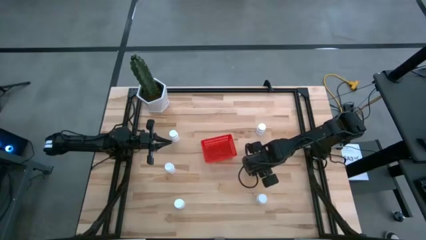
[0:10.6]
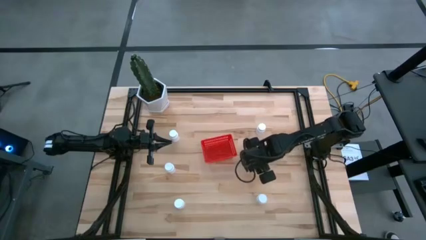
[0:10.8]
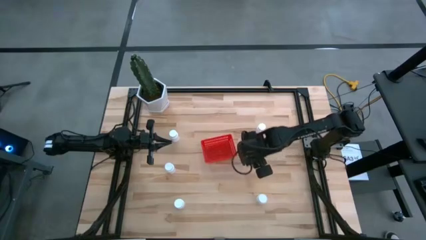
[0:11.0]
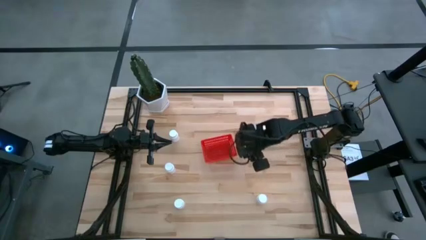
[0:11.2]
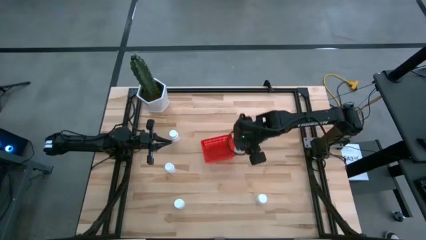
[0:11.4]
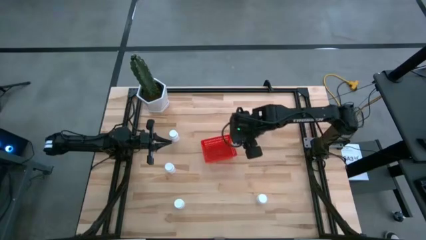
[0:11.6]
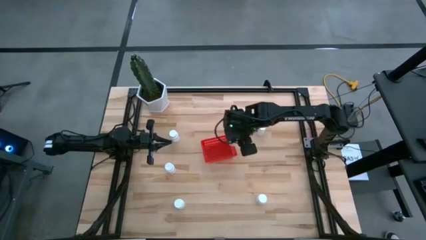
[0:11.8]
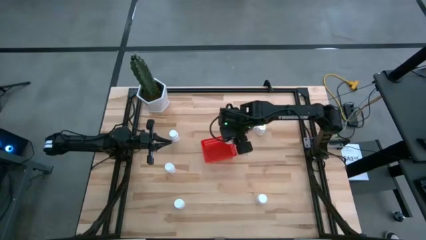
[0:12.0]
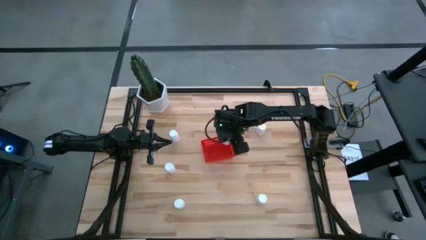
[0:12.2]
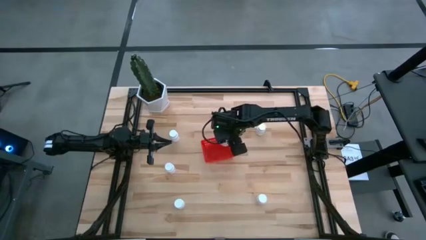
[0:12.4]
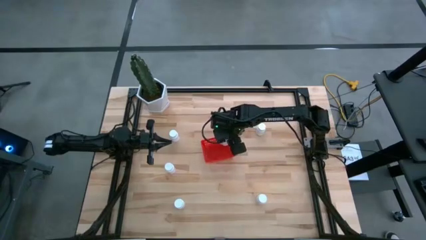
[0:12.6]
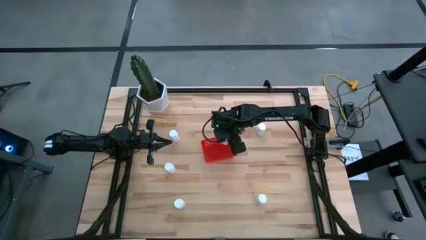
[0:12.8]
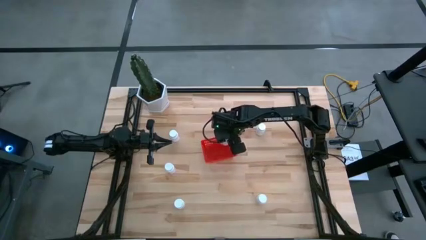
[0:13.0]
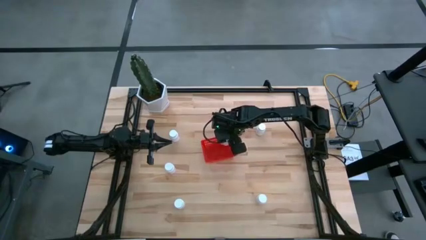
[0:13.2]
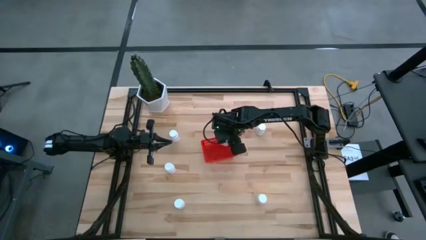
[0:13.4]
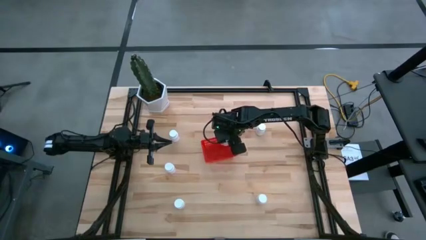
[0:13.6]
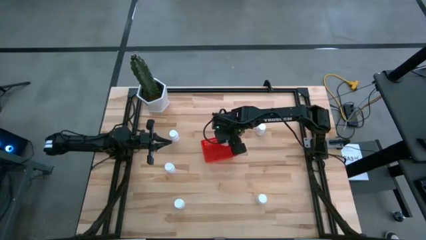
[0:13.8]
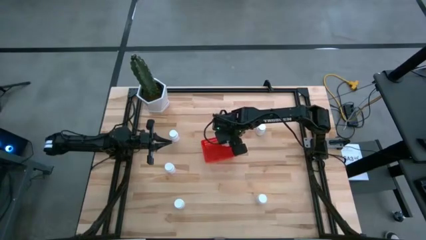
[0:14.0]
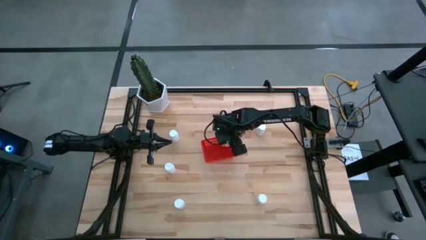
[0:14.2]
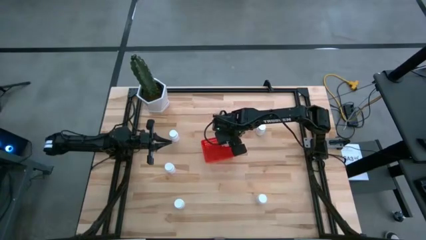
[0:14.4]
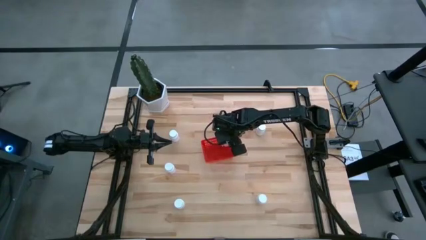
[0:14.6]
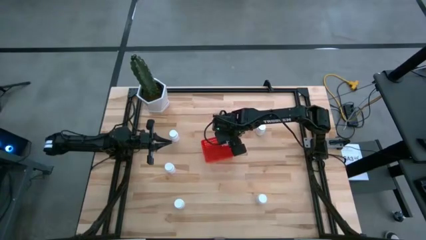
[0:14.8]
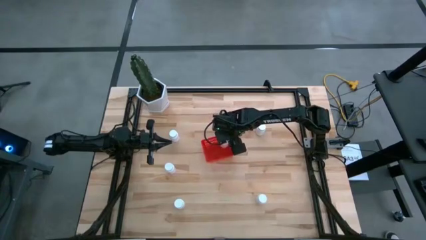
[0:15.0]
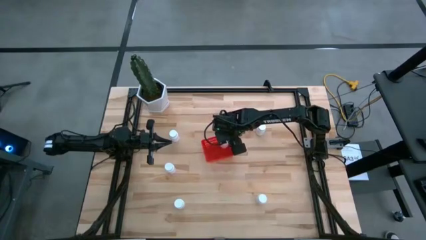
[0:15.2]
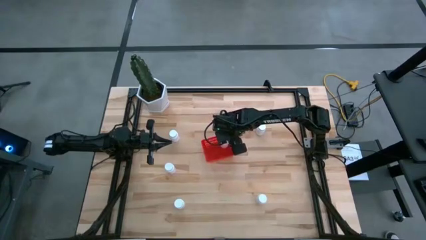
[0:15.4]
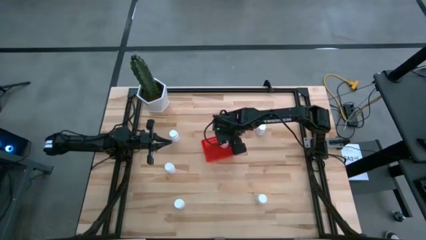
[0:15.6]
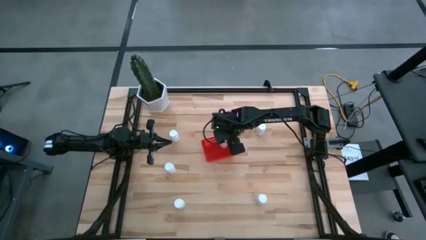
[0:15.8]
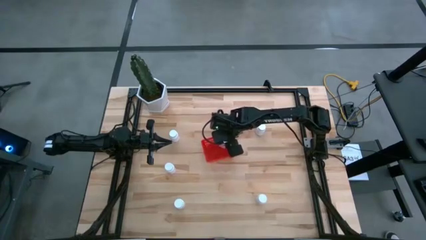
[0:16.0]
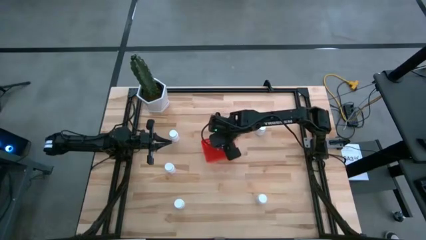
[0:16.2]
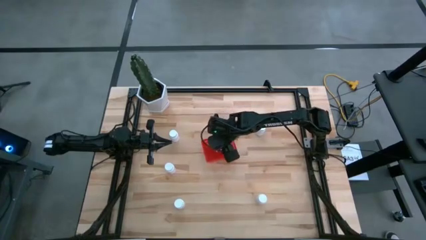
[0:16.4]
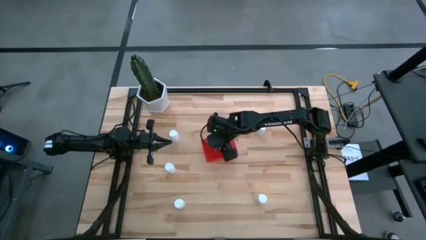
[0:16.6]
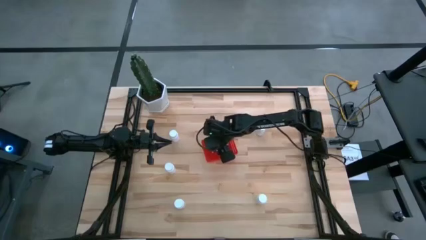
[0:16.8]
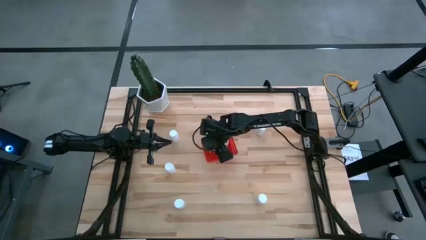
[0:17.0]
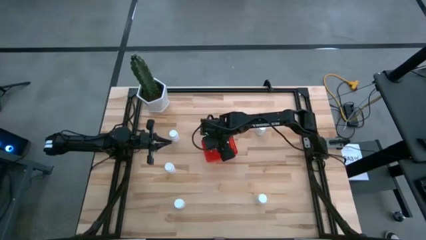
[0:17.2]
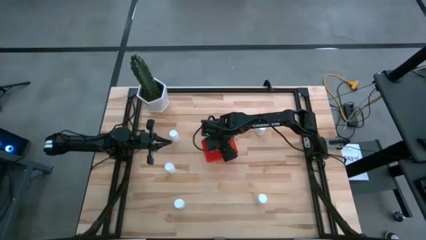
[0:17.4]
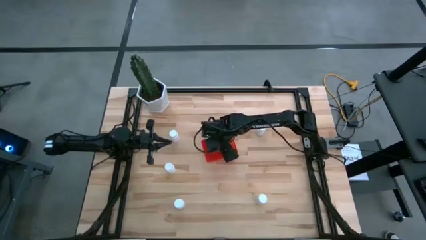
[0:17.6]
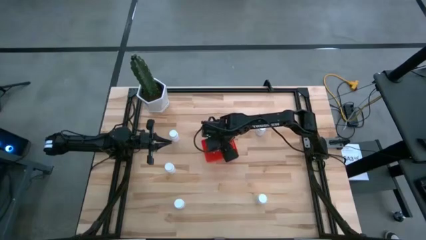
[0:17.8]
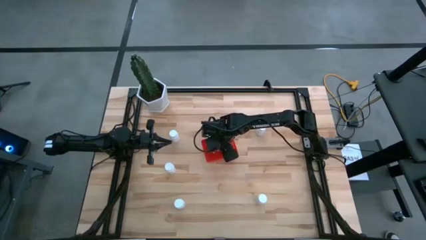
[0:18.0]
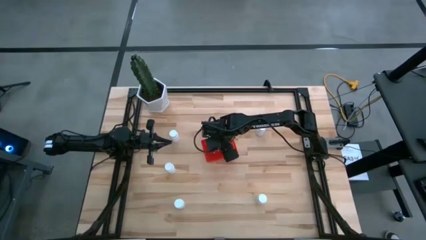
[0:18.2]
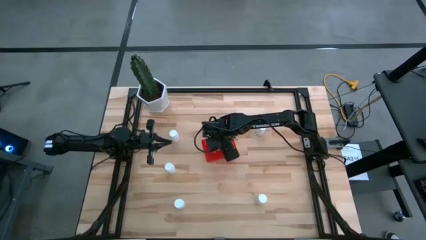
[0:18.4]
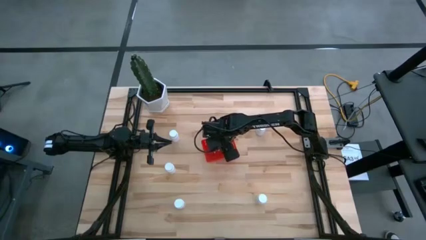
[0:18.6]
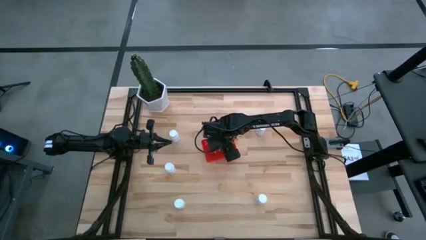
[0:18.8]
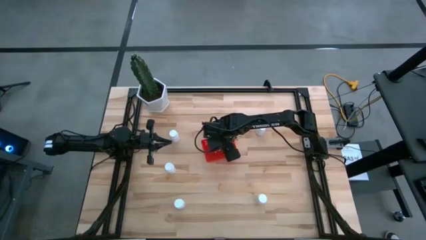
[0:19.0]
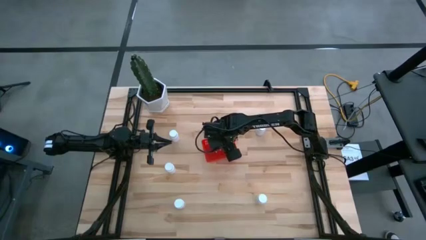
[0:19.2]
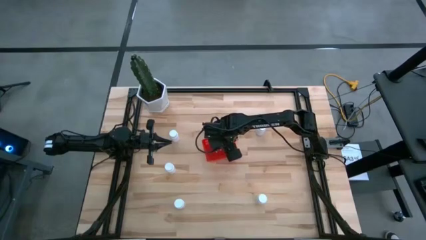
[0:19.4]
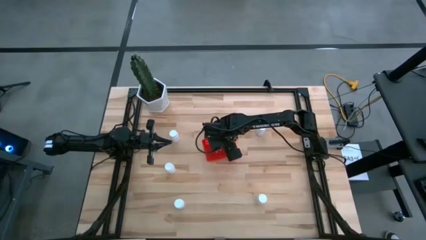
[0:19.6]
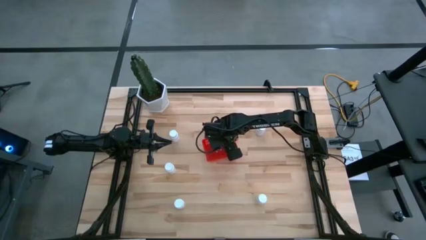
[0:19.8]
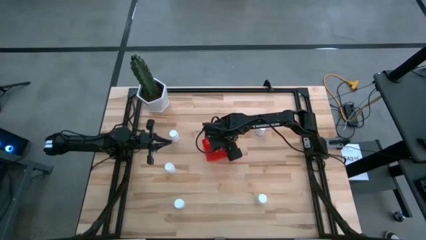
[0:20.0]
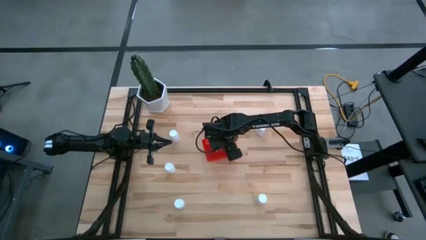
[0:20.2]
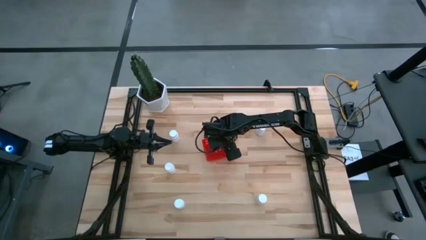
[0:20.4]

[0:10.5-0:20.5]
Task: Pick and place pill bottles into a basket
Put the white pill bottle into the red bin

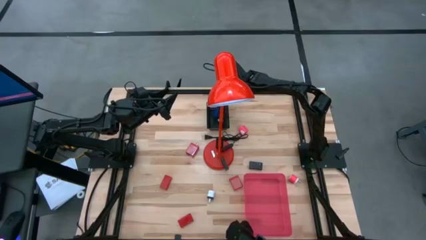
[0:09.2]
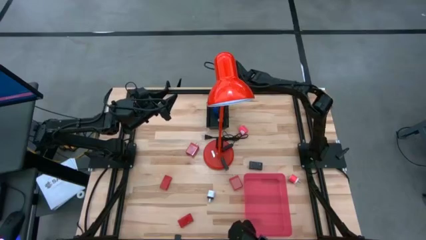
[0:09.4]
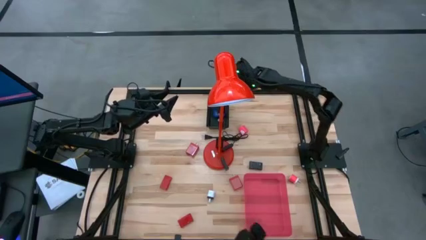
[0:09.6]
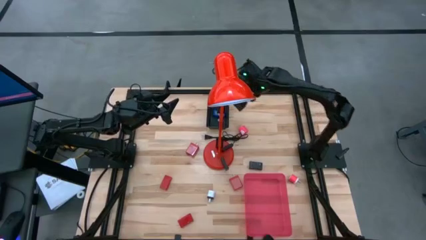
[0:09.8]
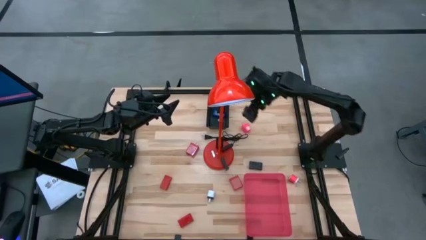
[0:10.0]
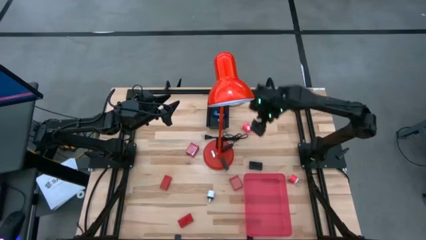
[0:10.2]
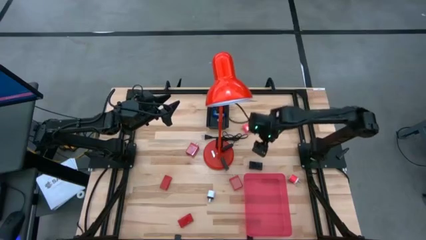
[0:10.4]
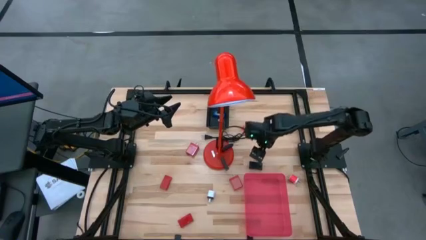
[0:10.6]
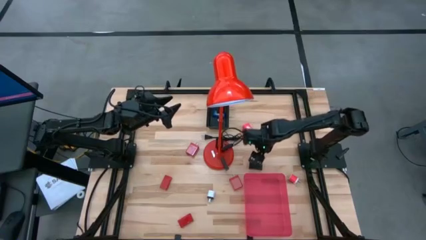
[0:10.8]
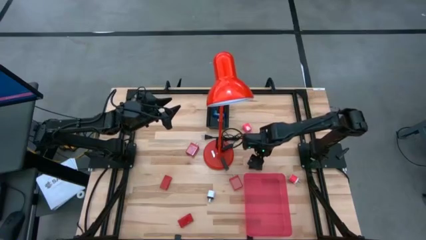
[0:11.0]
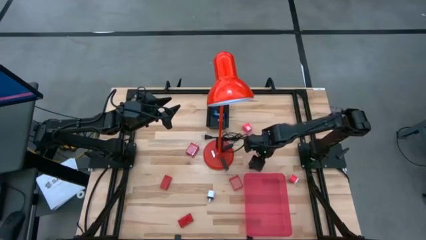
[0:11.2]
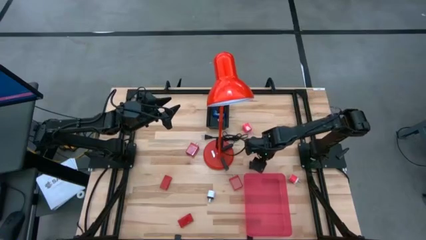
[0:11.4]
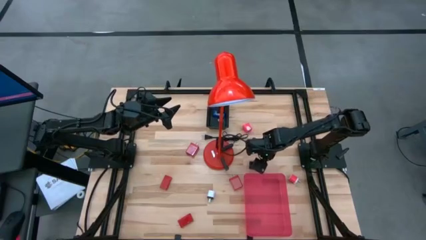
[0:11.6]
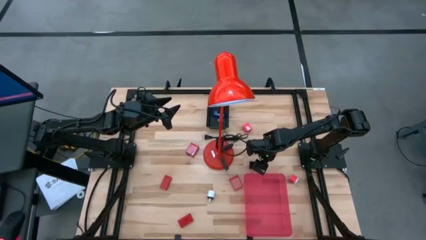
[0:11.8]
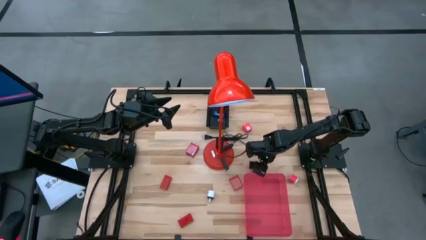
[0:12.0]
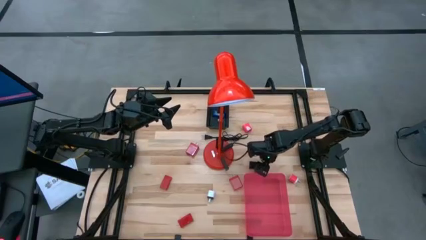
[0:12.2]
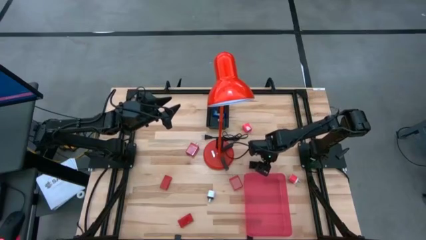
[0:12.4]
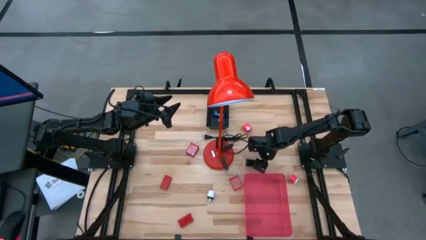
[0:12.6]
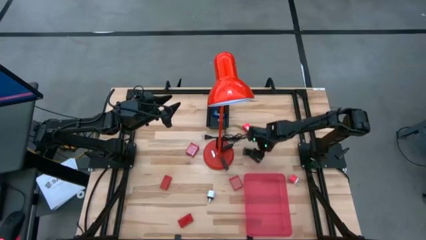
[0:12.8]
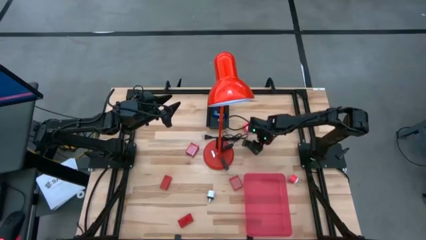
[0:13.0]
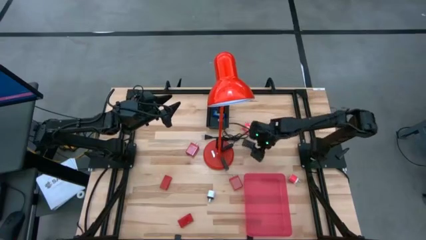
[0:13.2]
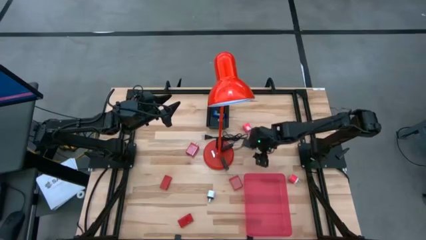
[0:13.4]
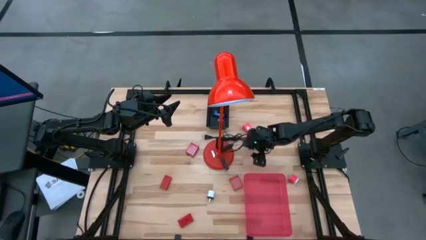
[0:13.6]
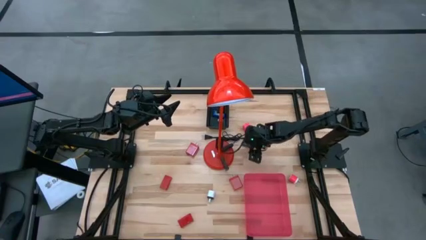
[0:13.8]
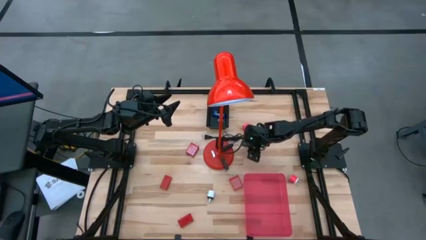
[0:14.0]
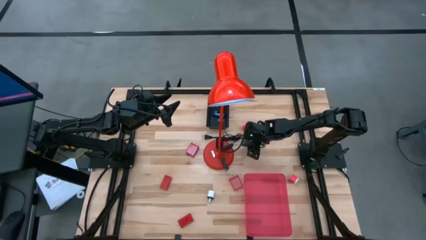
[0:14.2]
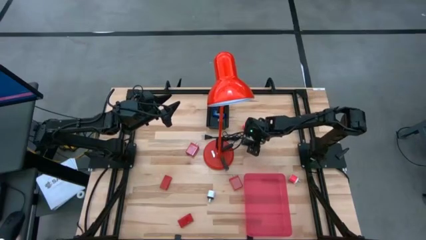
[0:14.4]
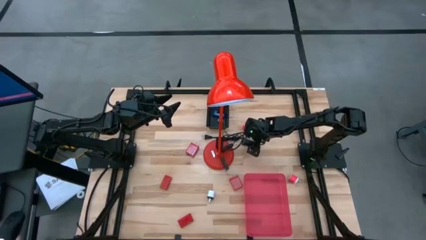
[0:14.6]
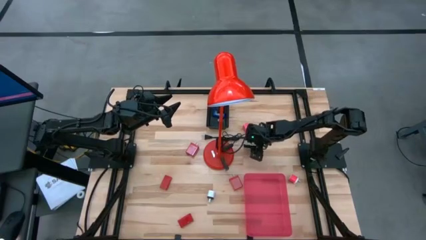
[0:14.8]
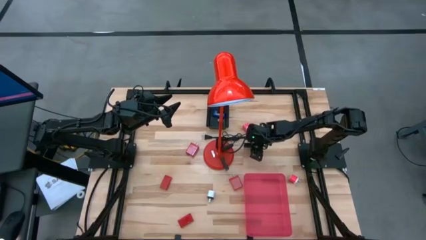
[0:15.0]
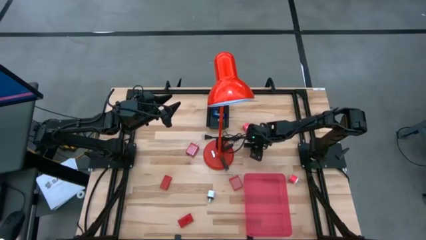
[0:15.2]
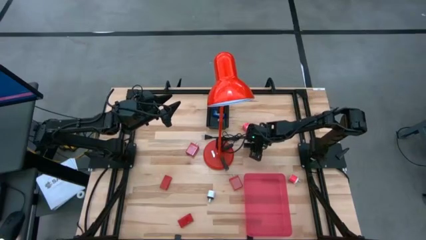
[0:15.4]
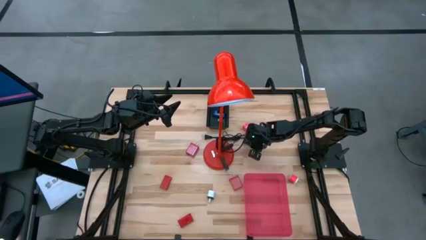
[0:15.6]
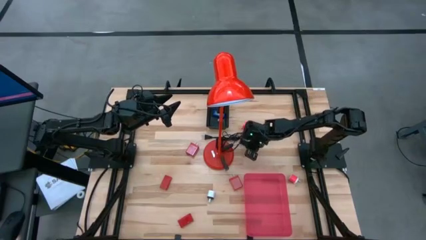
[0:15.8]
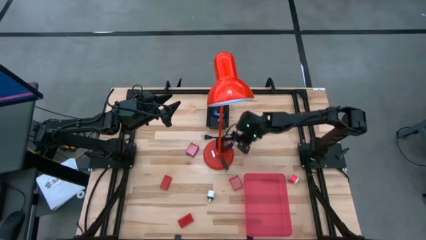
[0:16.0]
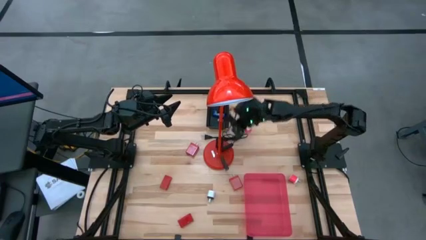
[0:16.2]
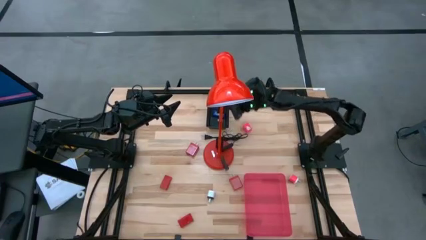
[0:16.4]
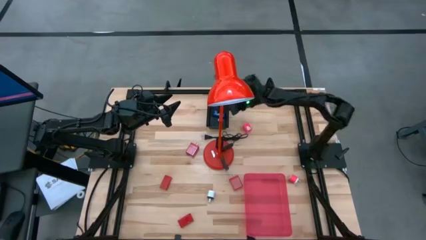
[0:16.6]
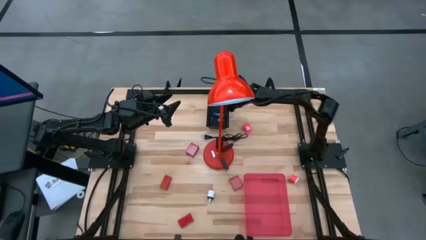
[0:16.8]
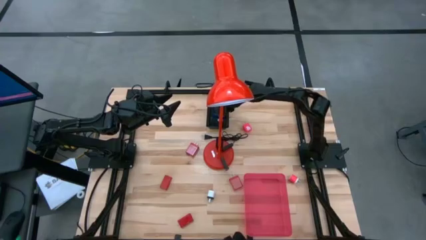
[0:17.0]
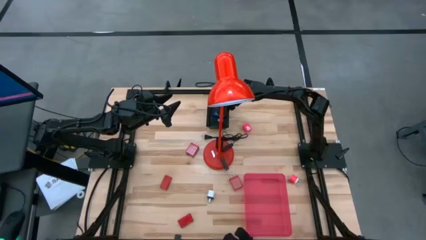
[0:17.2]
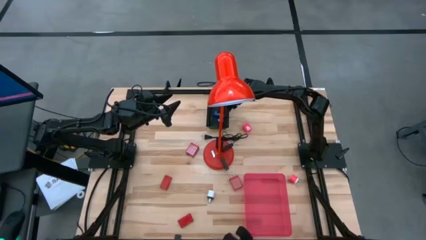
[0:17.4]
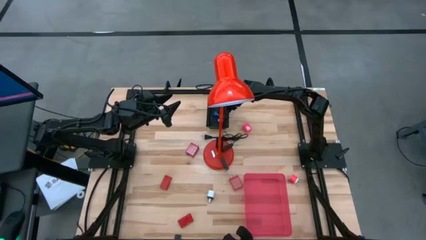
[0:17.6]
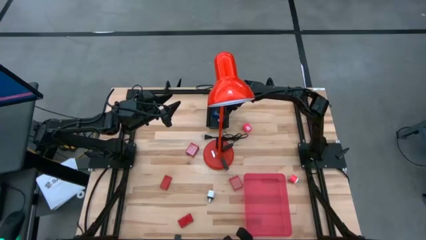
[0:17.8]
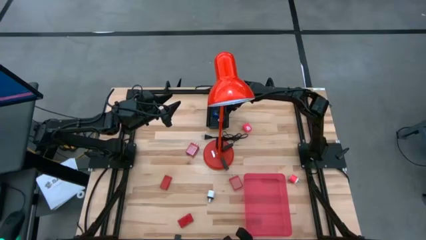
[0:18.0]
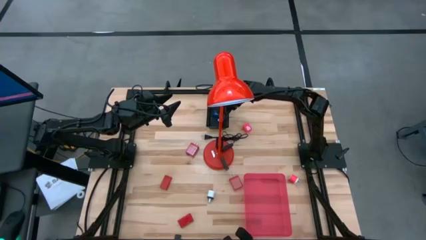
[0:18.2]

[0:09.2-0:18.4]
Task: Pick & Place Office items
Put the right black digital timer into the black bin
